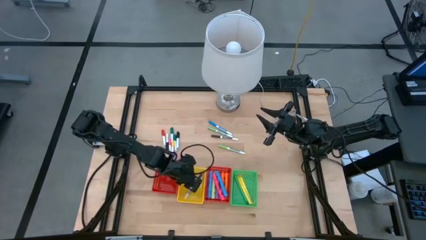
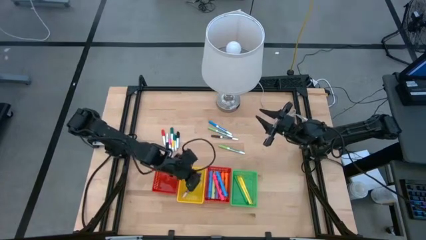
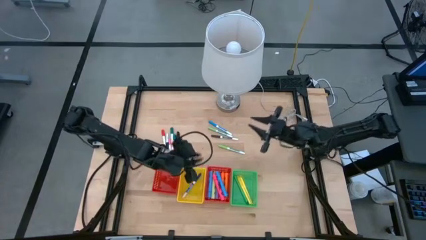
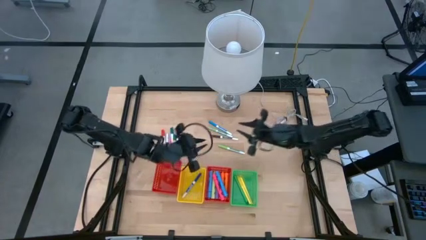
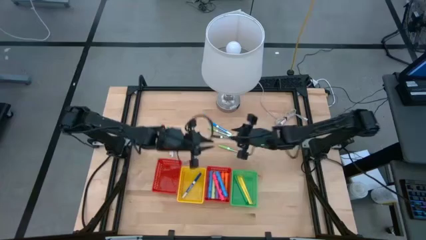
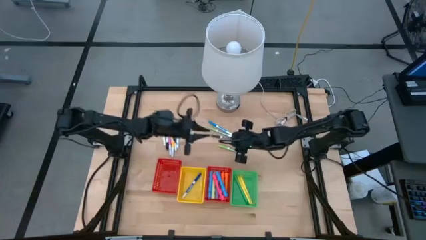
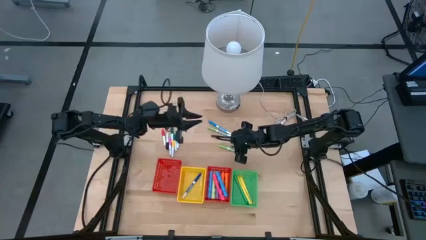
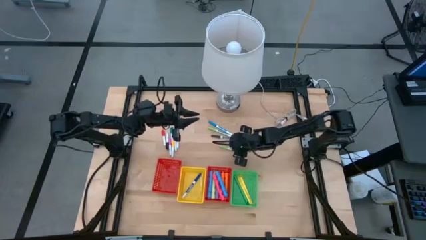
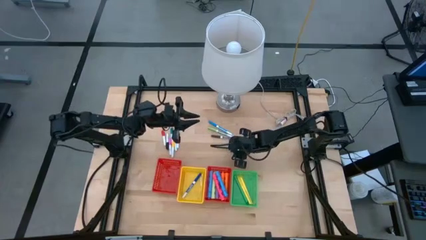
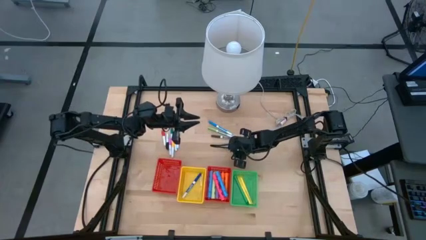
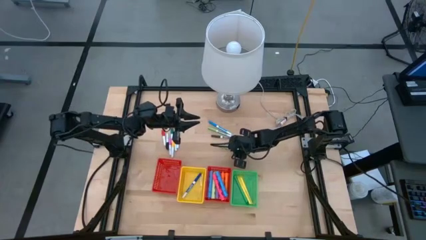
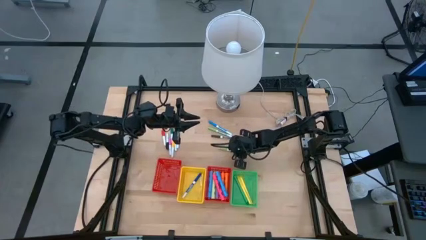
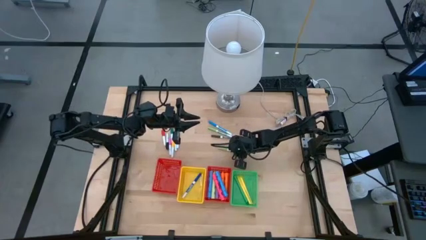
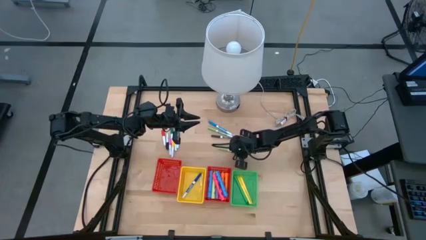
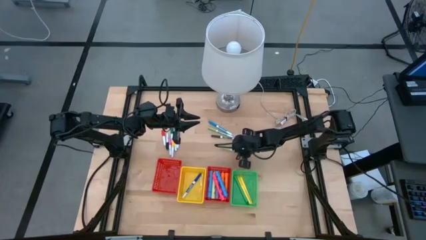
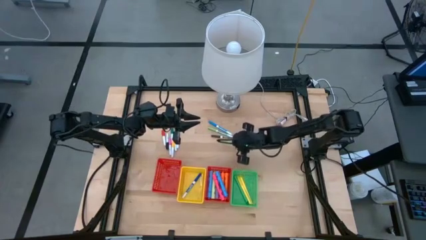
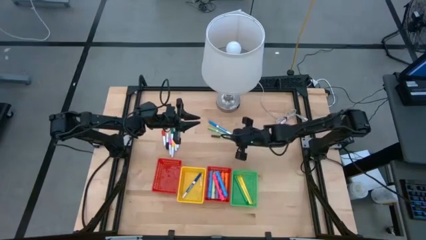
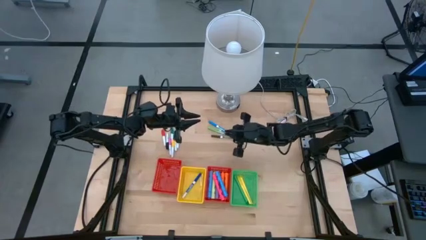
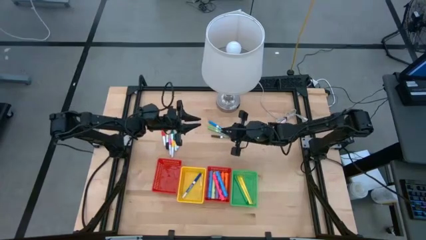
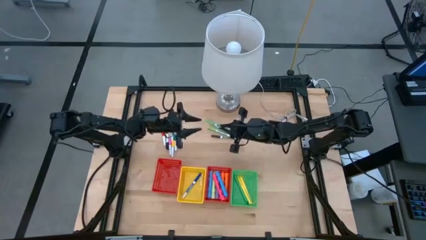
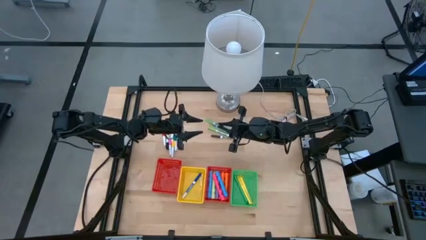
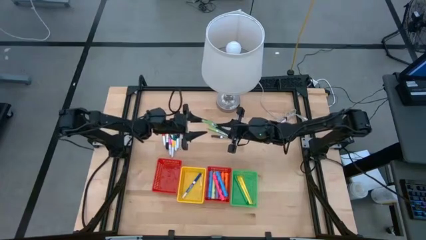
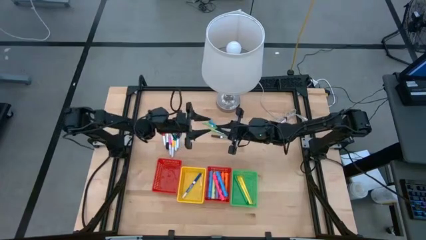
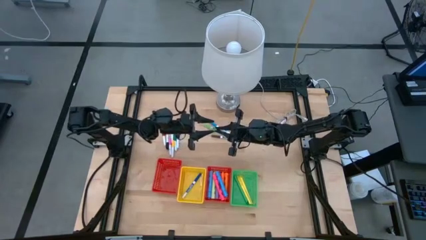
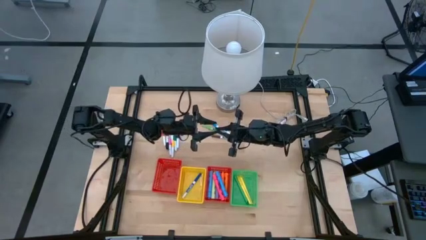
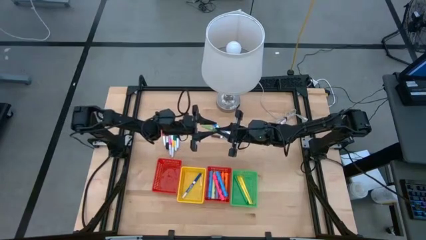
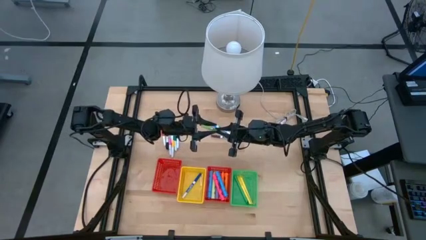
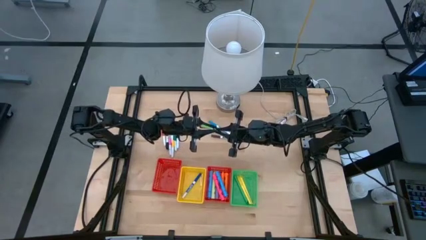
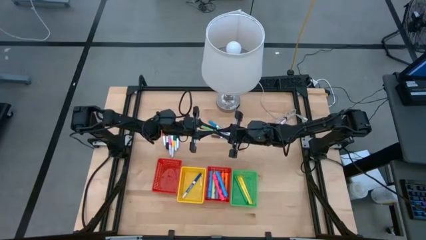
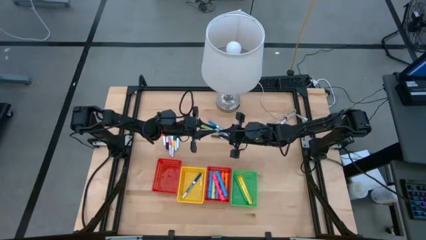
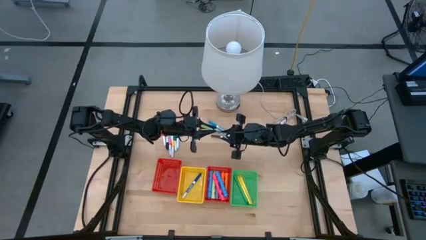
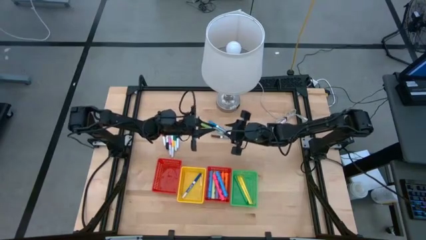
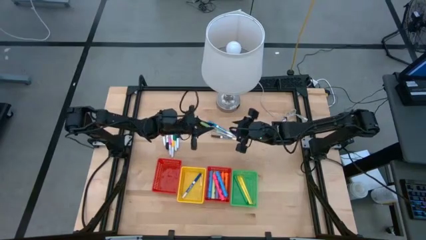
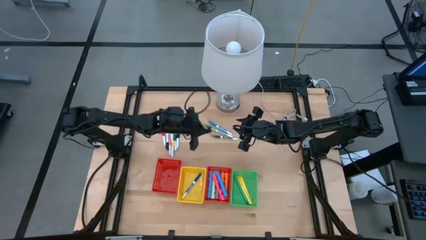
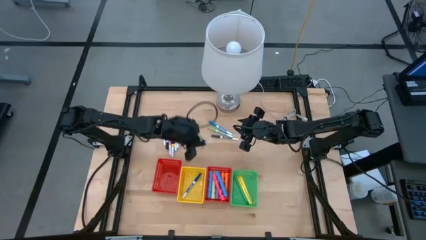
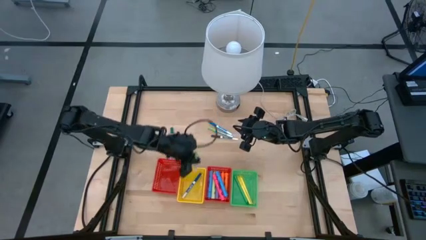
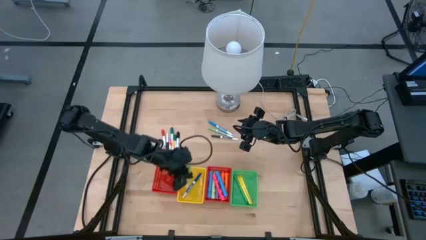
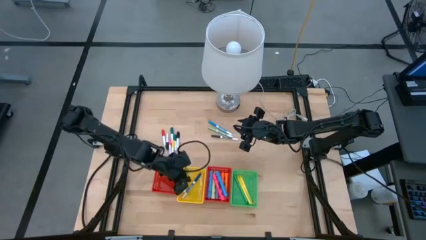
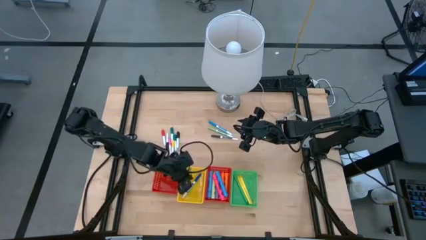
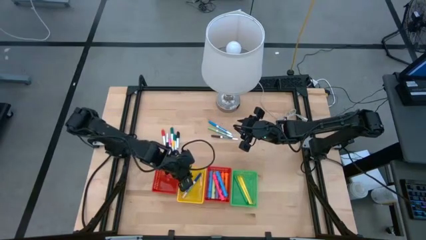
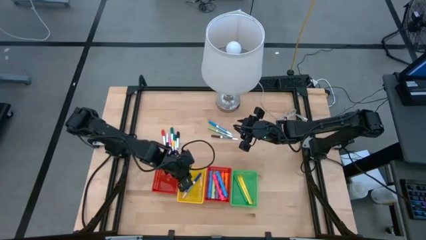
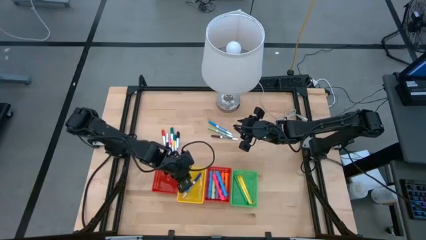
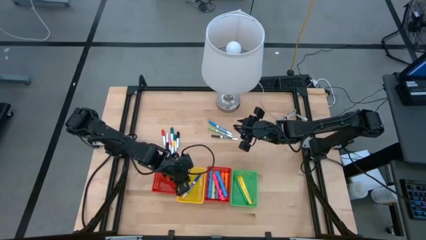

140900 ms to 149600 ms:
Task: Pick & Place Markers
Put the green marker into the yellow bin

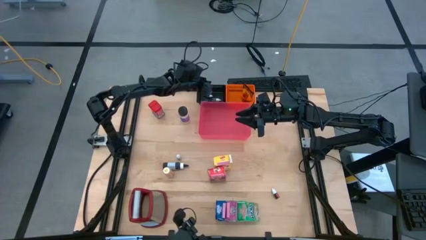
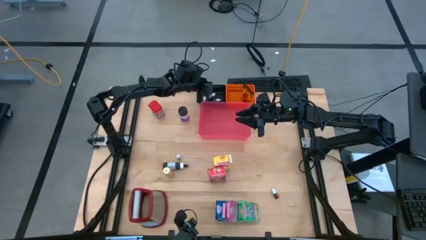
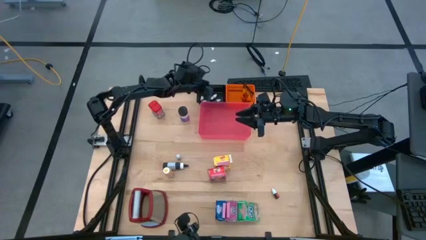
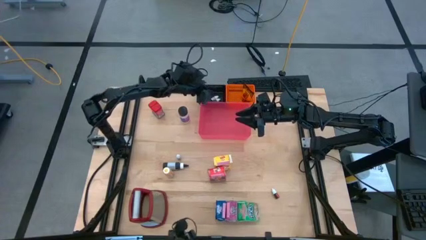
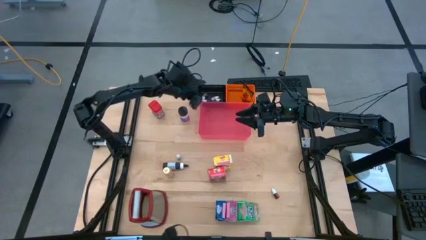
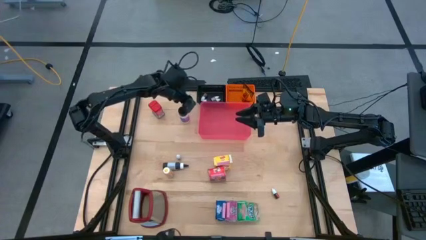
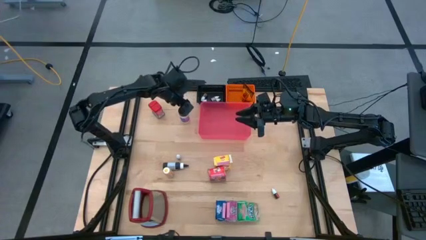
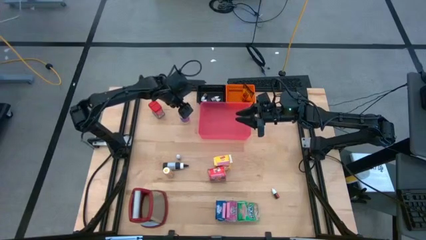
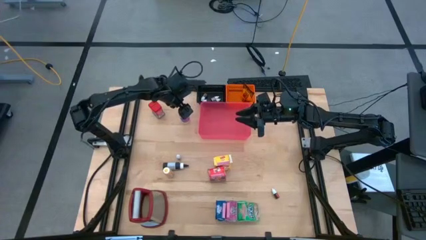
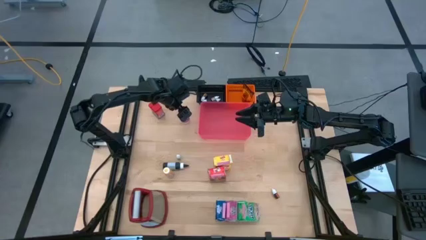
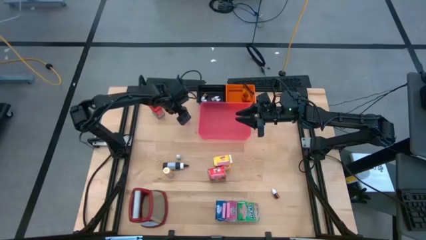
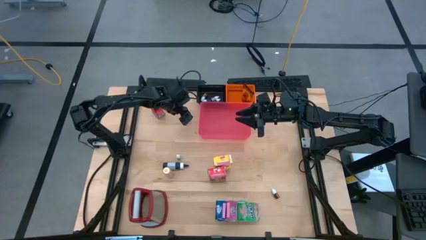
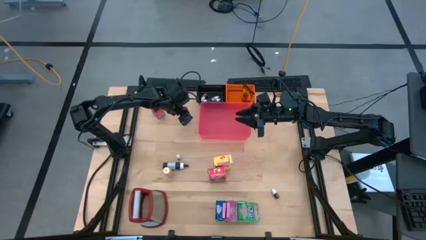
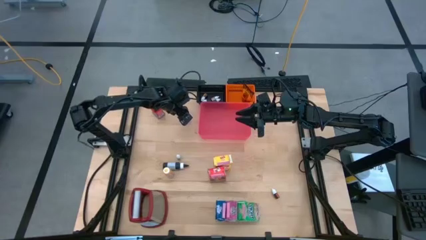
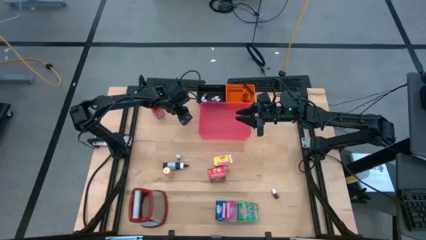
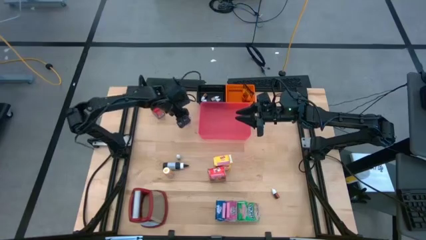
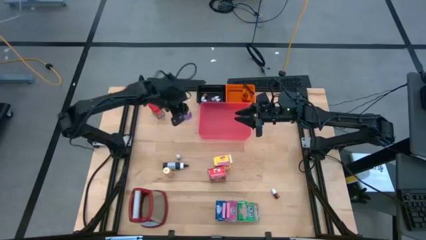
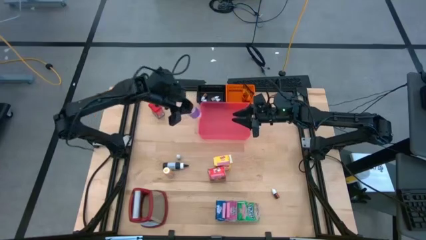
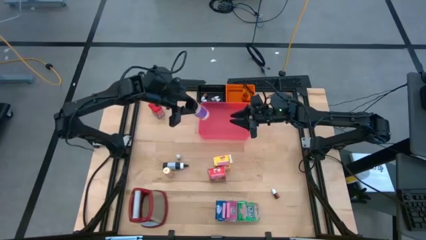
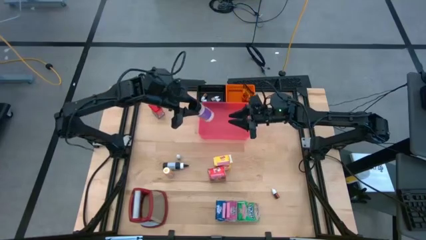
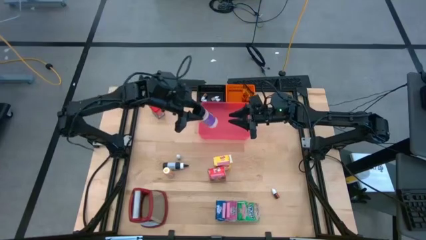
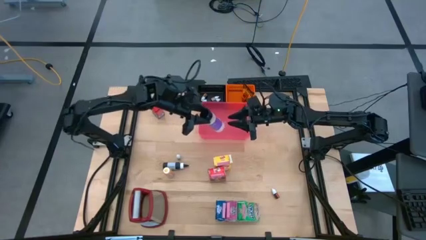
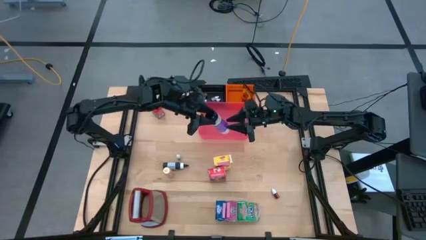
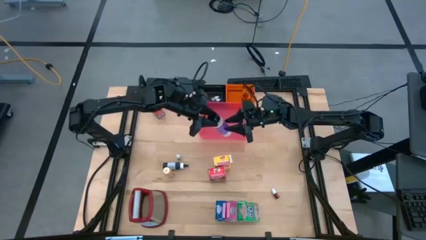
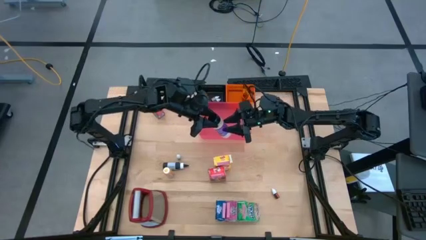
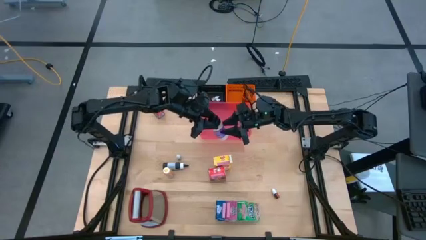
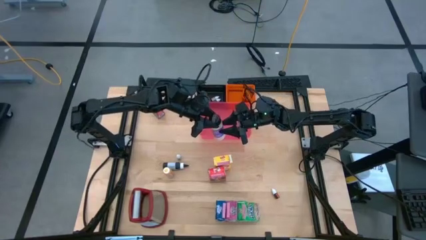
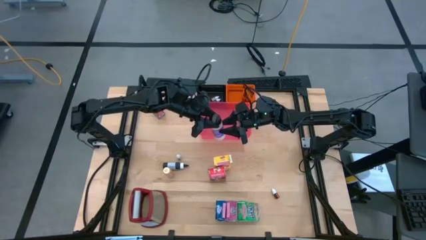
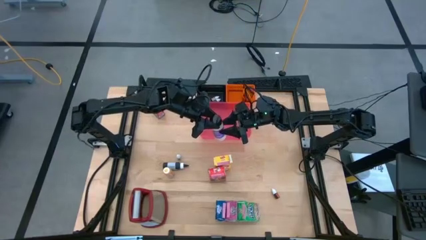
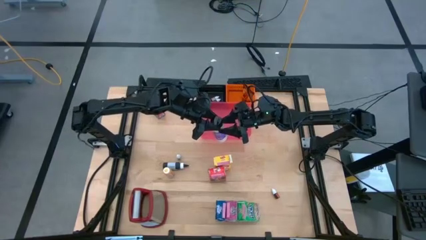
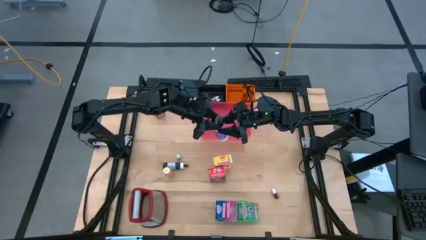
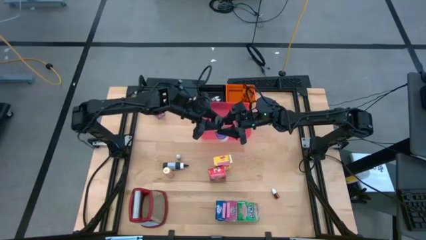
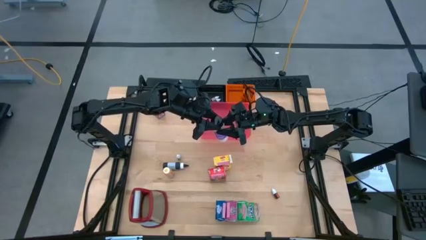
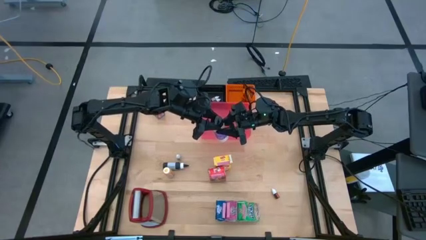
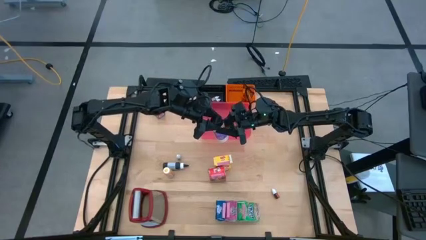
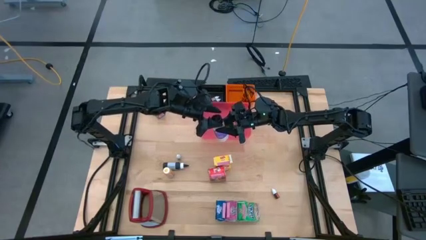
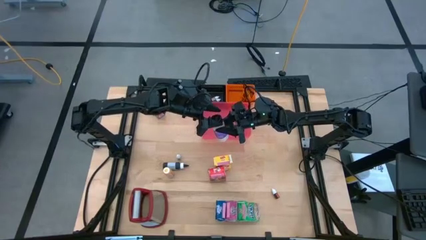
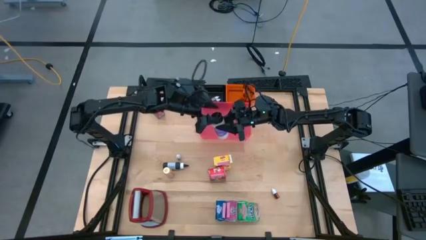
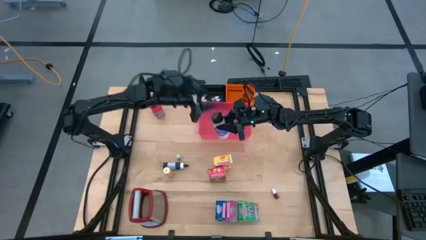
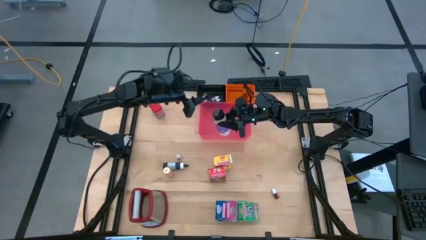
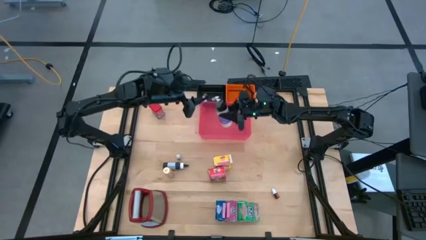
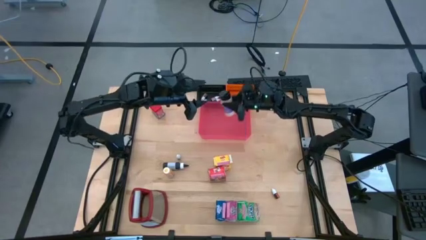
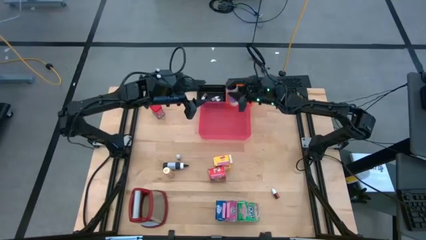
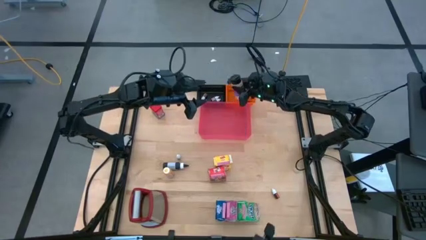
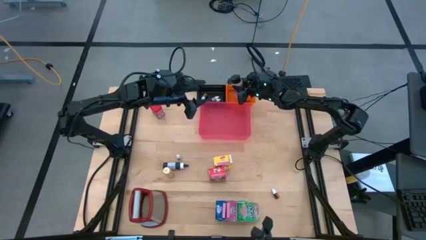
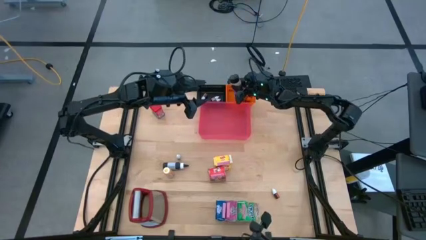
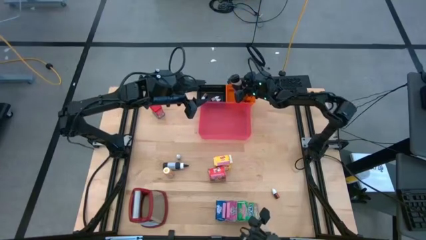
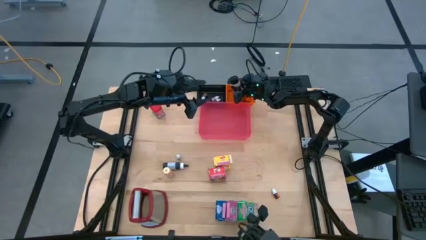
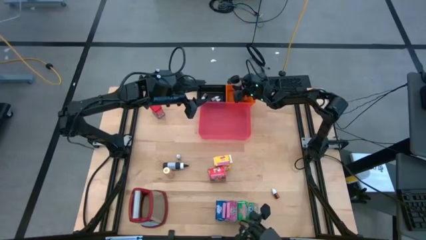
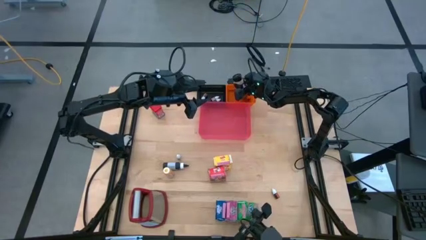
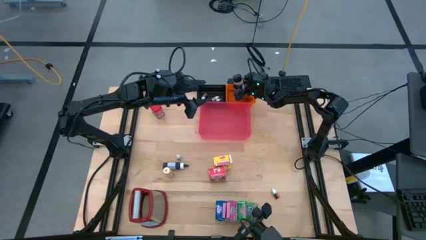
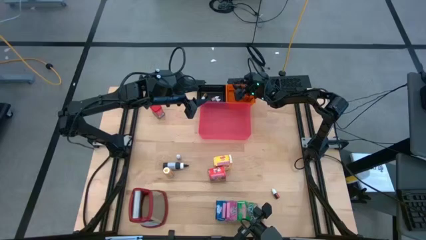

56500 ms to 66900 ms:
Task: Pick & Place Kitchen Items
Put the spice bottle into the orange bin
